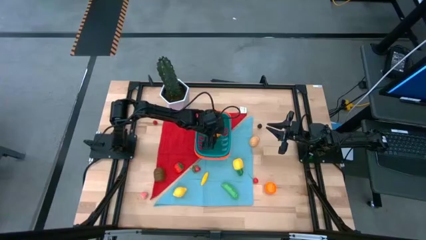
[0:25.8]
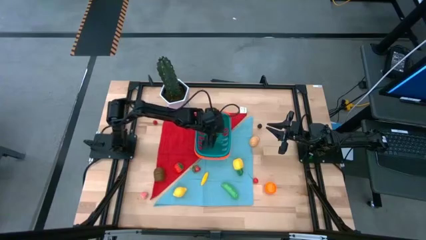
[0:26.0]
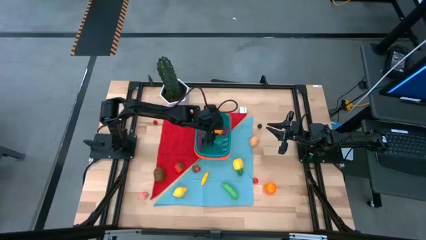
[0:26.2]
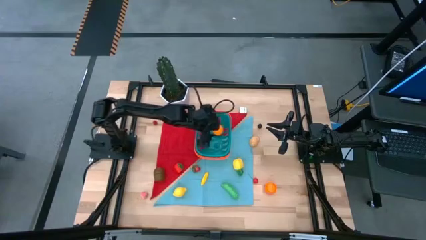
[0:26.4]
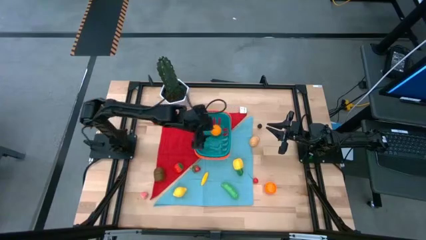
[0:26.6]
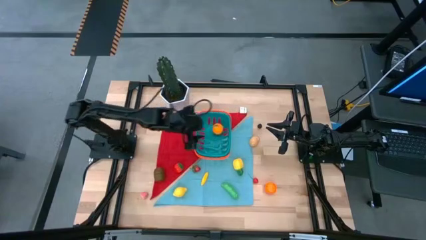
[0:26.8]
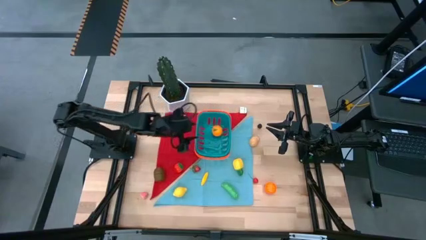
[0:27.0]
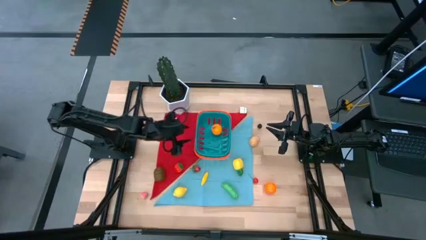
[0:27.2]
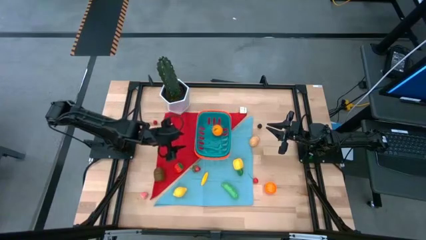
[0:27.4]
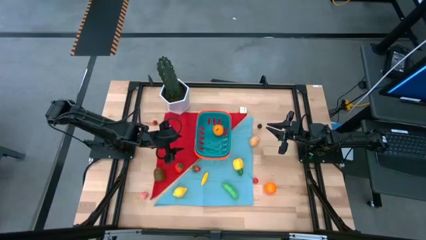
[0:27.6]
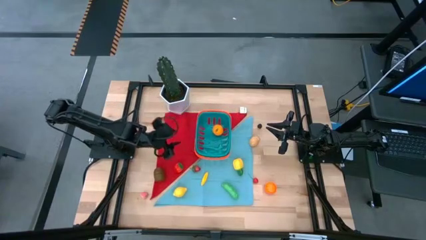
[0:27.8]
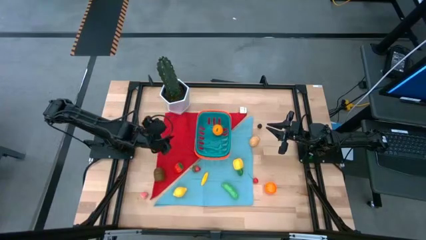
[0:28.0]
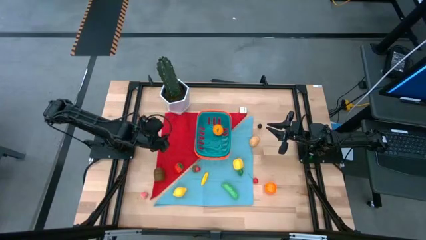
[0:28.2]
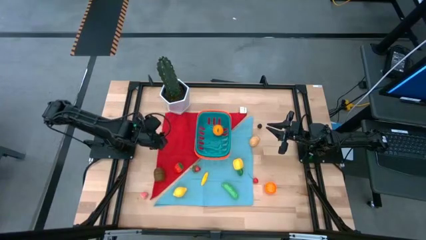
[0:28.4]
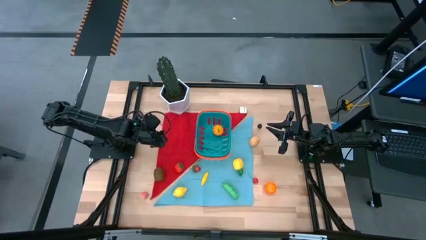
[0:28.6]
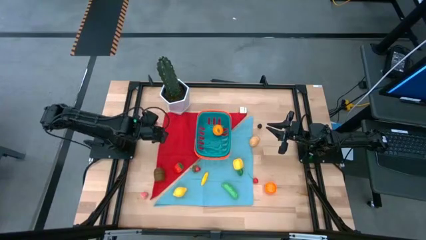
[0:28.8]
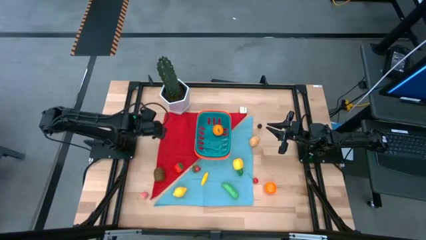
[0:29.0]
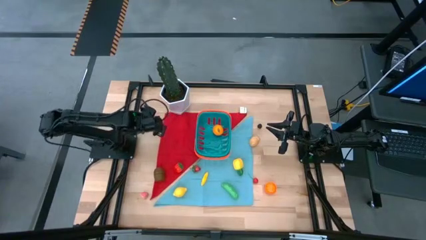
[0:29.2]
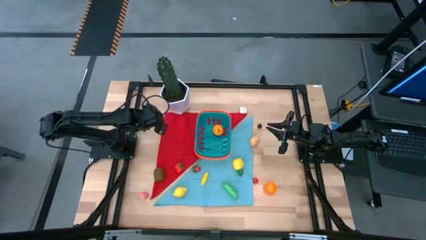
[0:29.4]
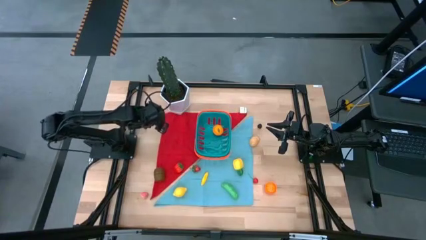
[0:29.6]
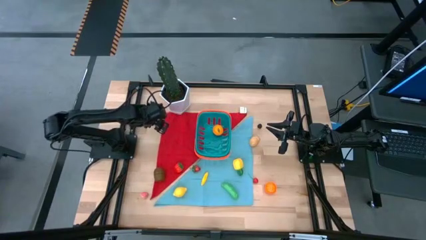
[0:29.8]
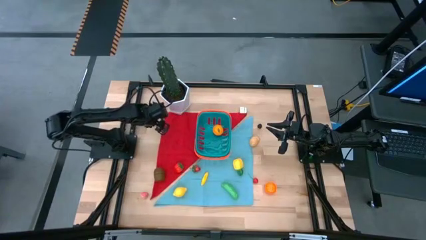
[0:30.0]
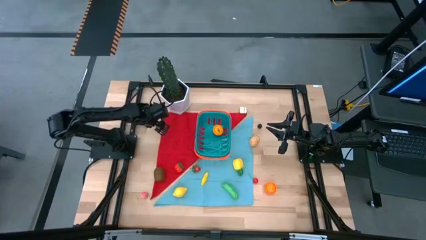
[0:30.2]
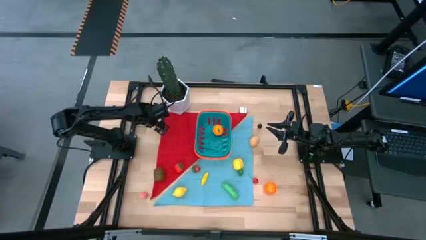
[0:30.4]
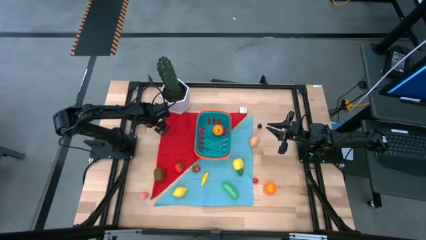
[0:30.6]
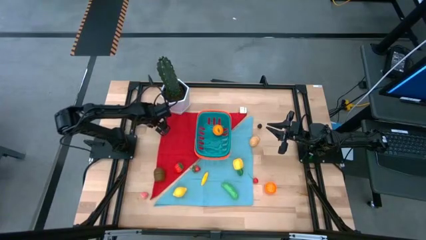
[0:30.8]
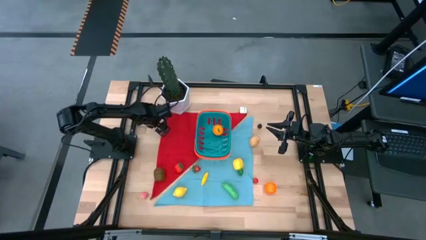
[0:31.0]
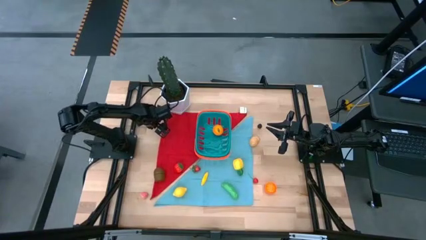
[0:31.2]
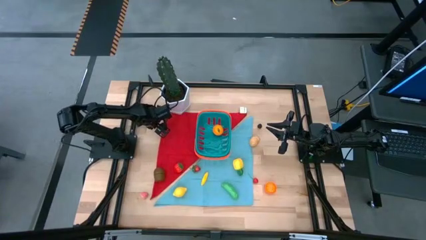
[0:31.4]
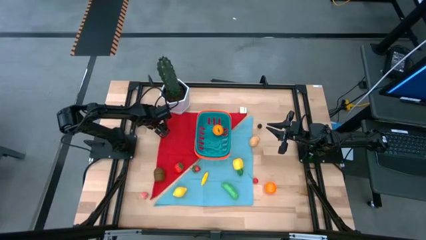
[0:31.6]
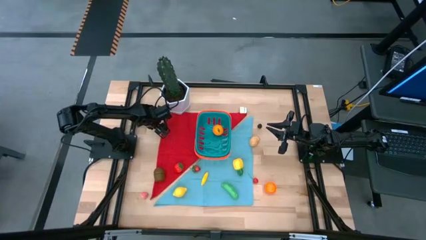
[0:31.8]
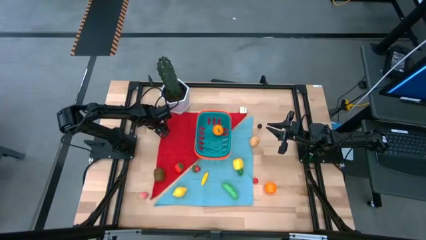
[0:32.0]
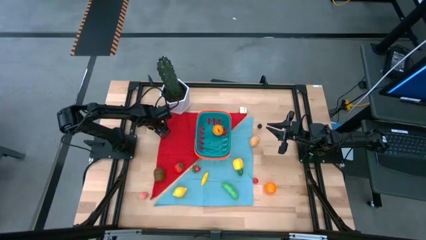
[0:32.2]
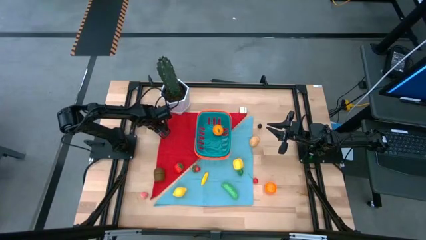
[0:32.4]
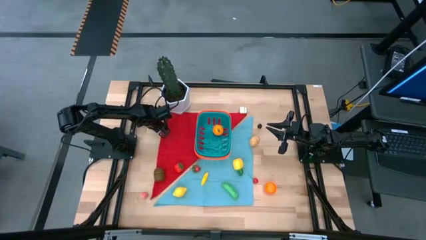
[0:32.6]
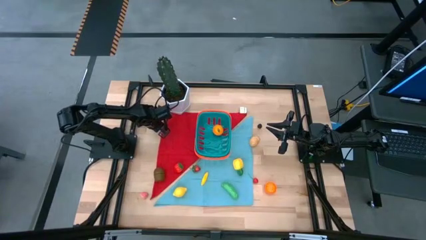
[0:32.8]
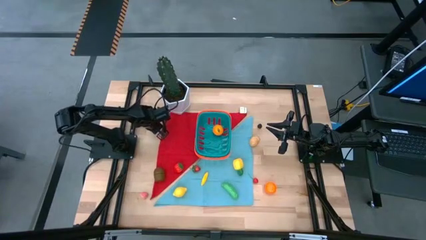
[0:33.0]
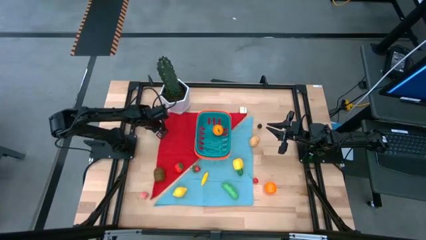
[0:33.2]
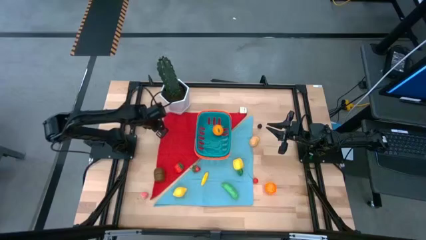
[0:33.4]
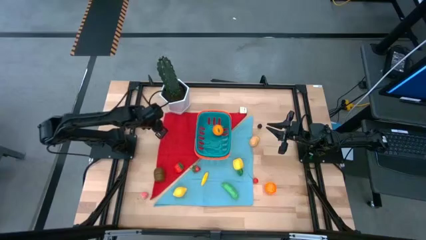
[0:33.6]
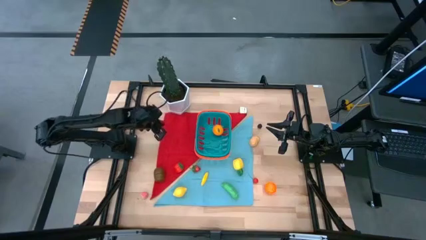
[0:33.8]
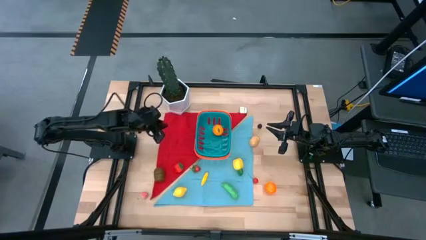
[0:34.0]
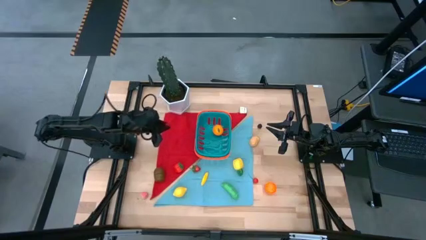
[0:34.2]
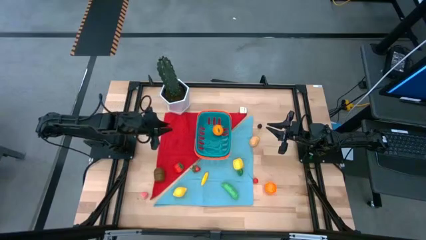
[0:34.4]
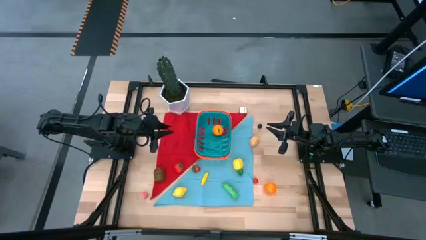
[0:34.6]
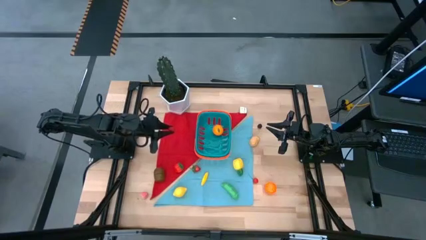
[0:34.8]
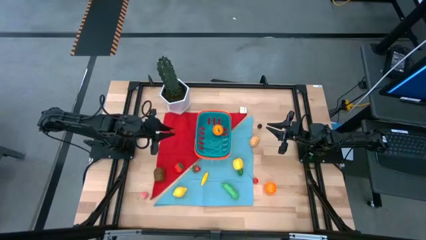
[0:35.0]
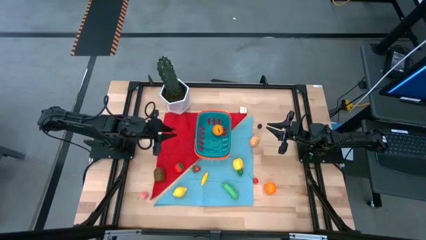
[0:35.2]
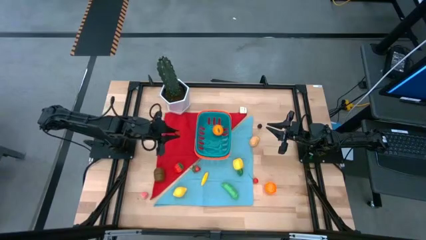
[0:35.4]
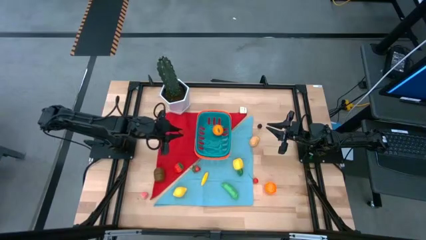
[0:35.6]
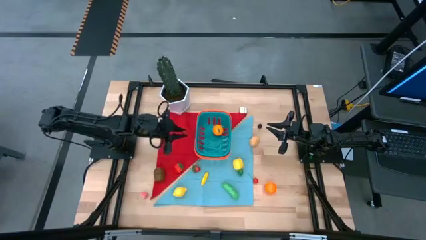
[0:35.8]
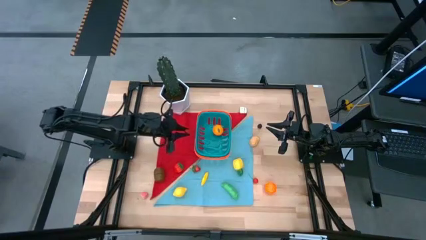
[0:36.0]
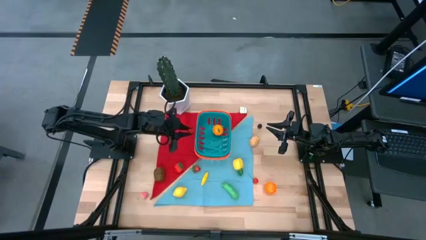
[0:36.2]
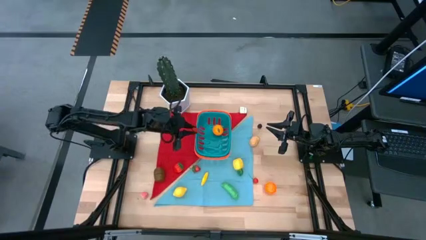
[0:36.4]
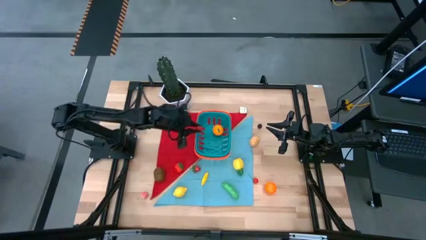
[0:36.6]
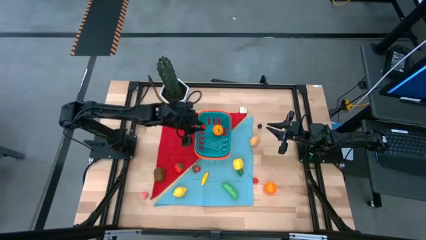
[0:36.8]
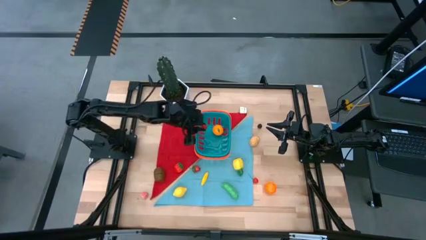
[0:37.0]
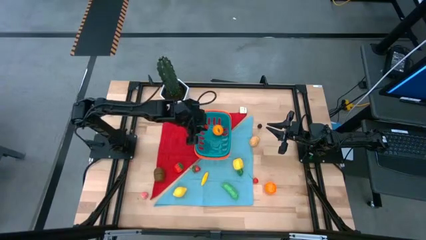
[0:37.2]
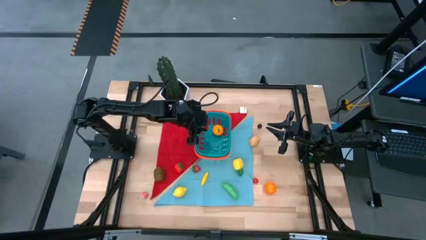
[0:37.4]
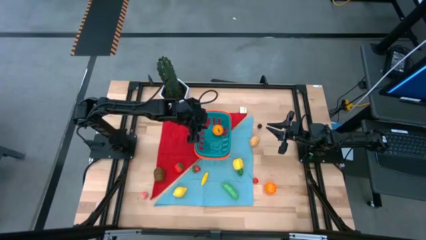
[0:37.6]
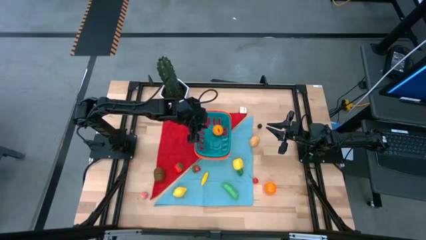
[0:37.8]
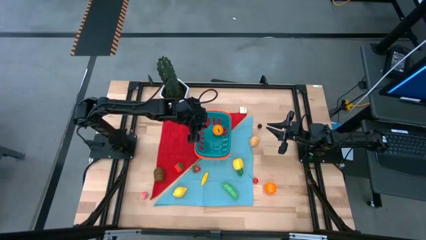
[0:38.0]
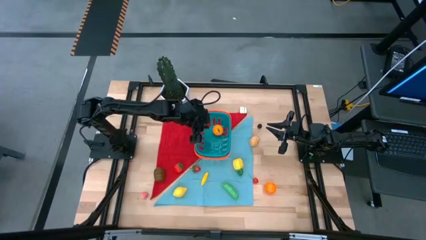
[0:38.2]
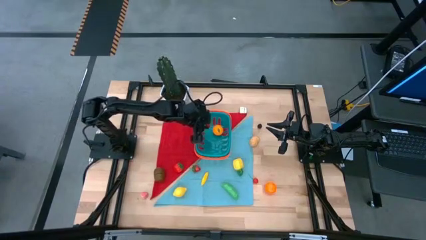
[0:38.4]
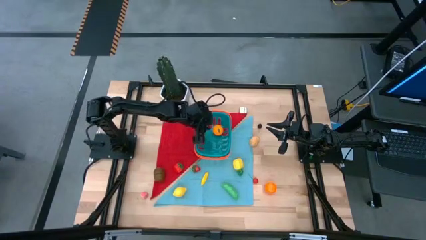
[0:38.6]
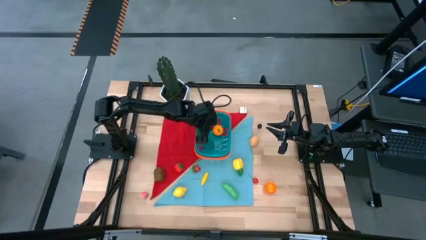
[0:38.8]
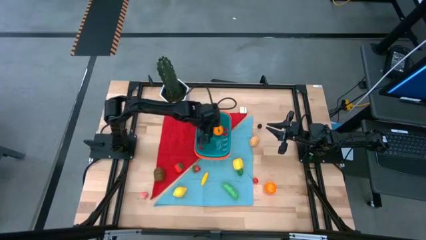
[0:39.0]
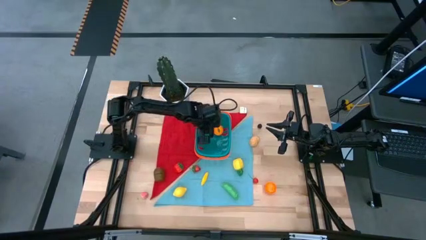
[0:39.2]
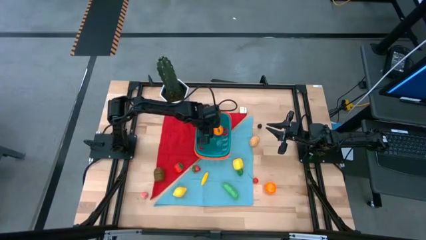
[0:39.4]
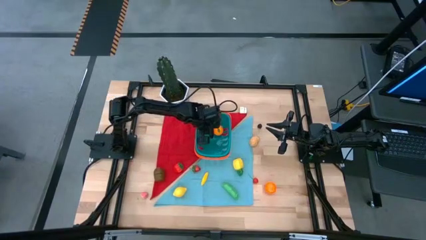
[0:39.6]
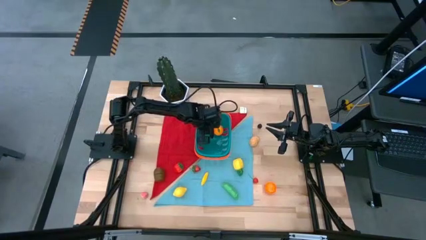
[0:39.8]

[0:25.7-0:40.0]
Task: Pick and placing Produce into tupperware
Put the raspberry into the basket
